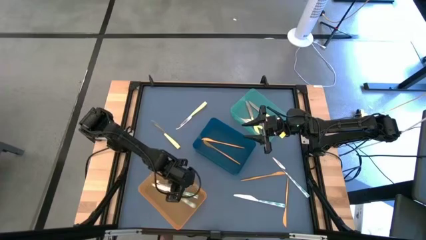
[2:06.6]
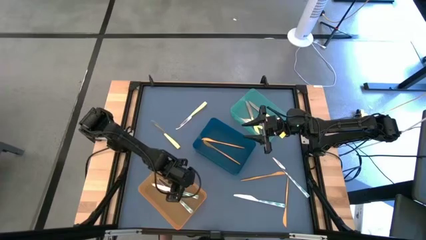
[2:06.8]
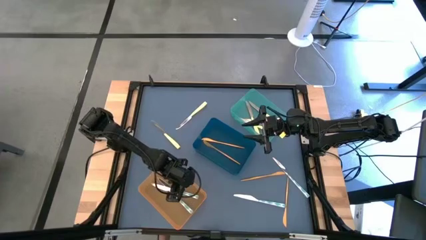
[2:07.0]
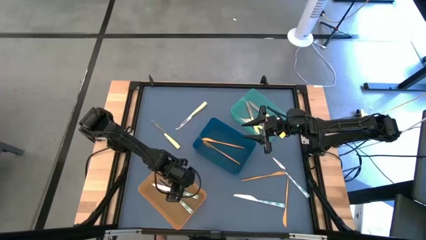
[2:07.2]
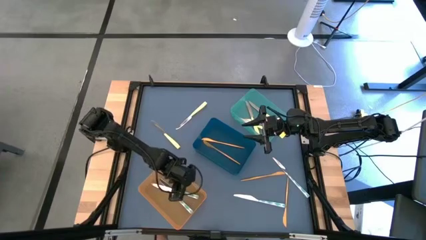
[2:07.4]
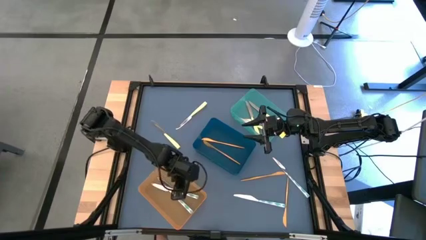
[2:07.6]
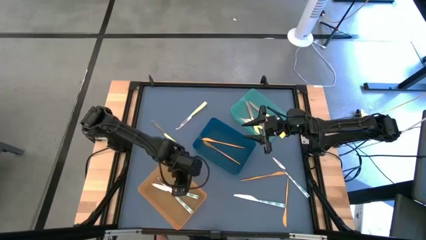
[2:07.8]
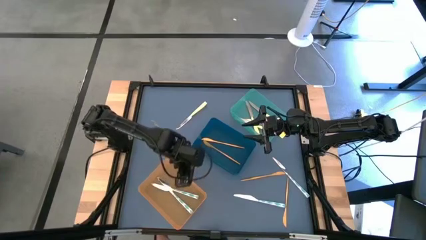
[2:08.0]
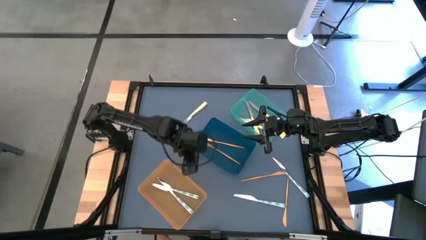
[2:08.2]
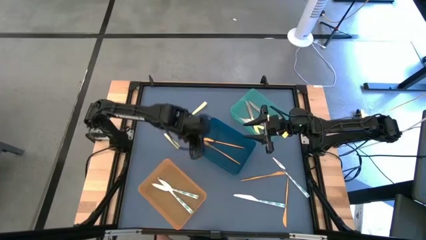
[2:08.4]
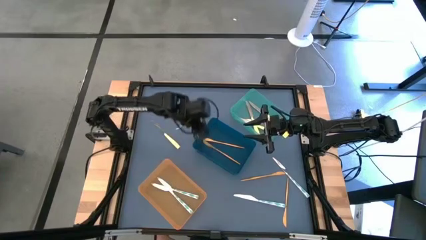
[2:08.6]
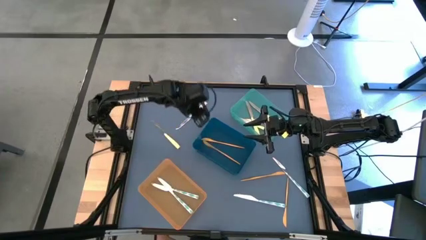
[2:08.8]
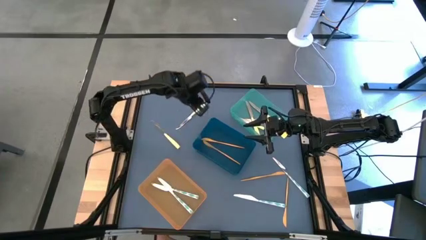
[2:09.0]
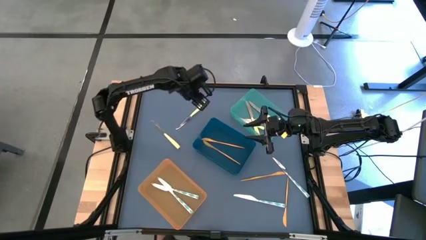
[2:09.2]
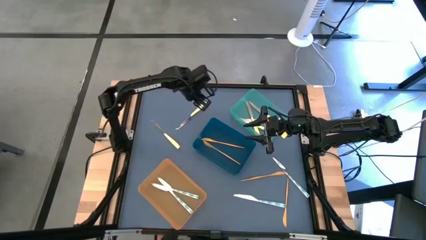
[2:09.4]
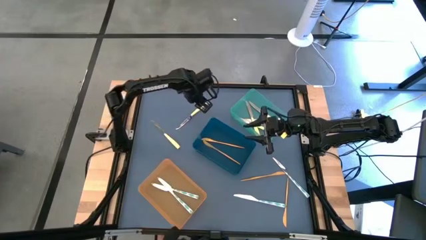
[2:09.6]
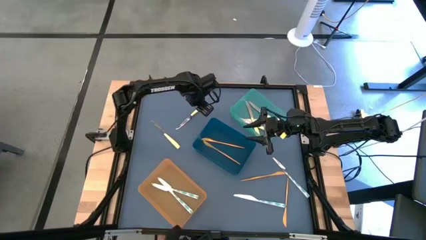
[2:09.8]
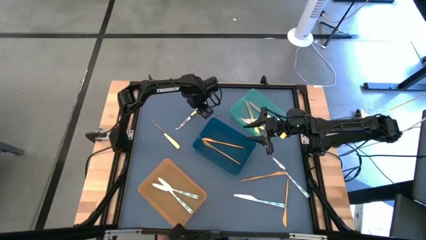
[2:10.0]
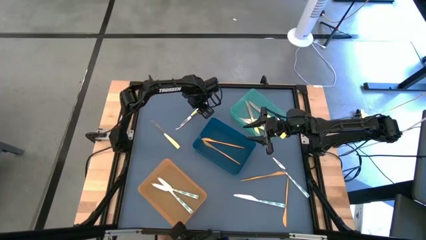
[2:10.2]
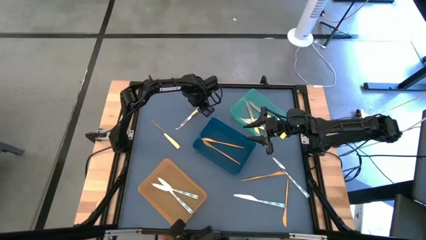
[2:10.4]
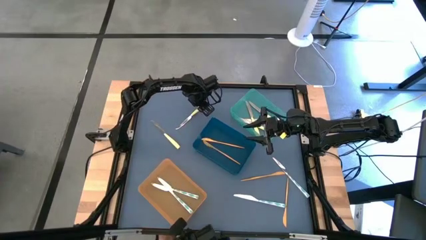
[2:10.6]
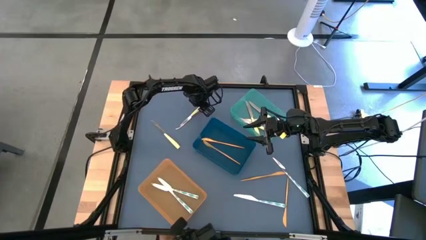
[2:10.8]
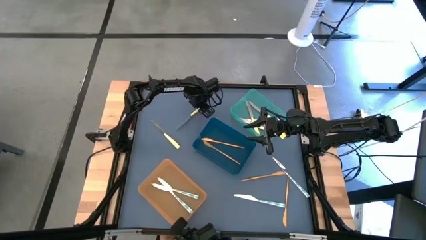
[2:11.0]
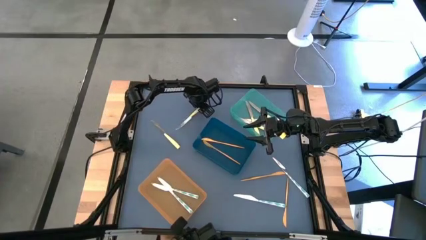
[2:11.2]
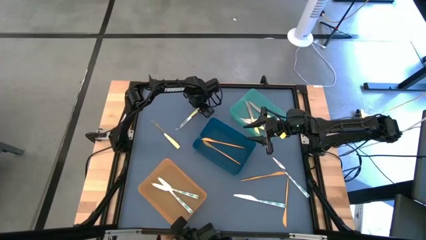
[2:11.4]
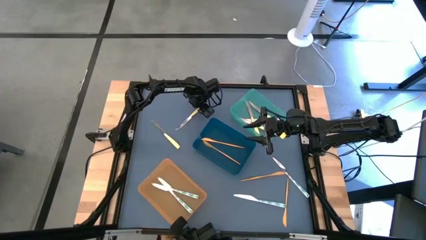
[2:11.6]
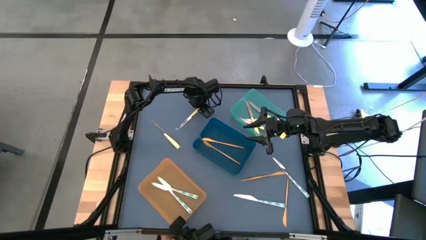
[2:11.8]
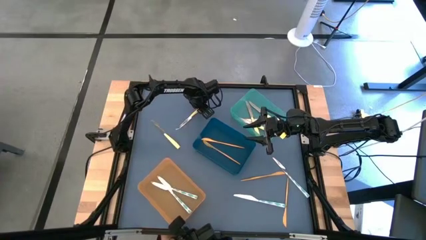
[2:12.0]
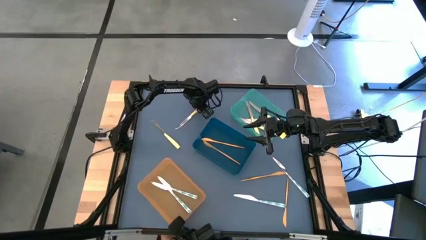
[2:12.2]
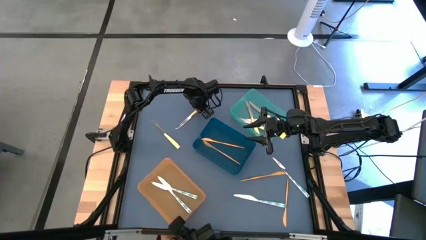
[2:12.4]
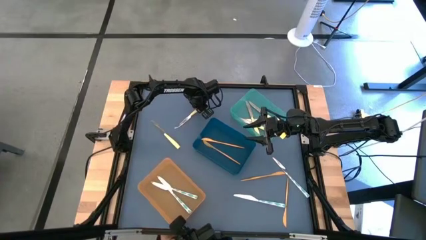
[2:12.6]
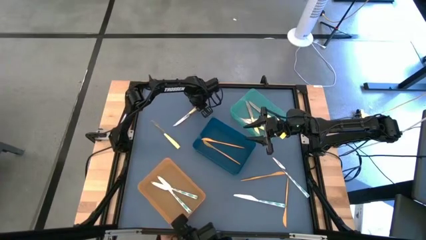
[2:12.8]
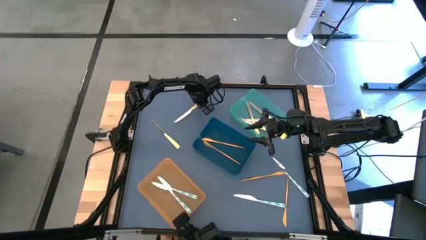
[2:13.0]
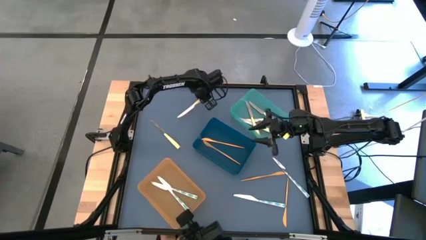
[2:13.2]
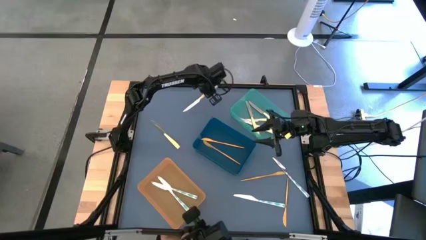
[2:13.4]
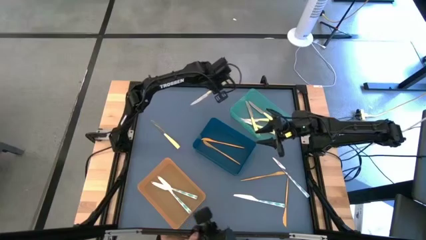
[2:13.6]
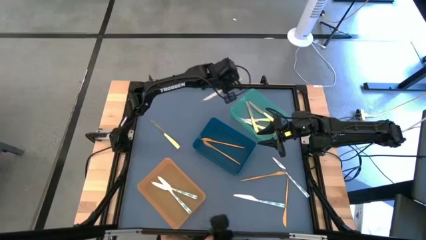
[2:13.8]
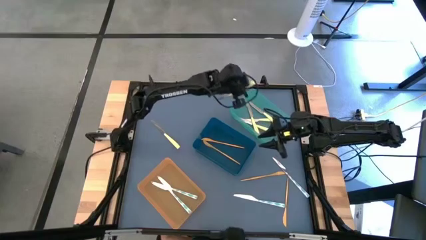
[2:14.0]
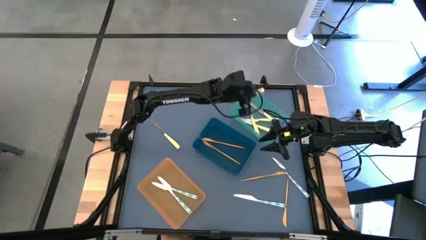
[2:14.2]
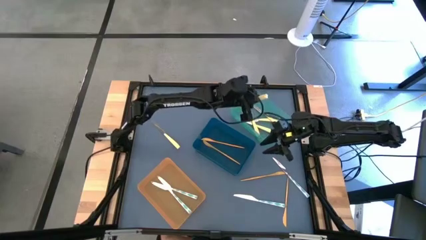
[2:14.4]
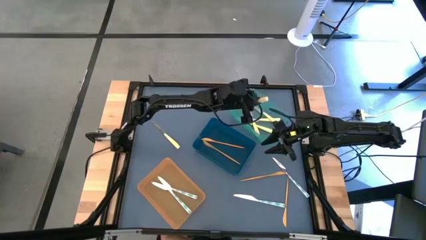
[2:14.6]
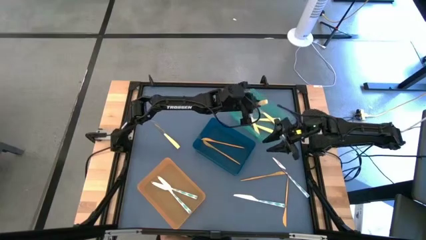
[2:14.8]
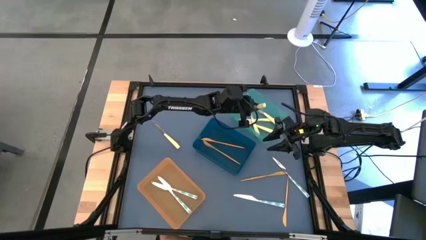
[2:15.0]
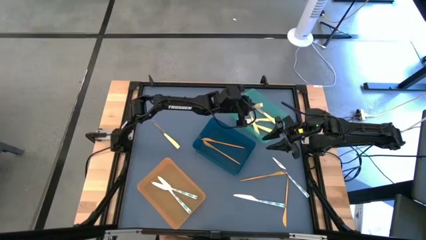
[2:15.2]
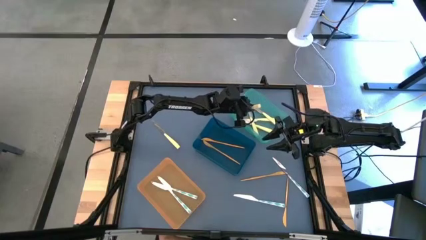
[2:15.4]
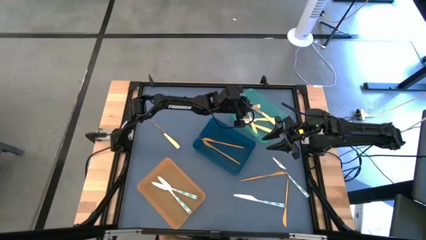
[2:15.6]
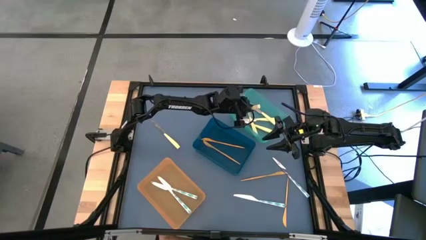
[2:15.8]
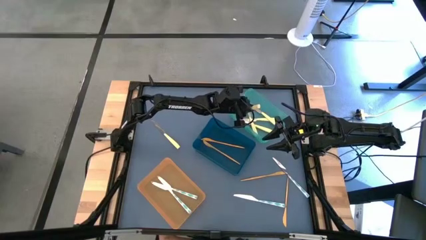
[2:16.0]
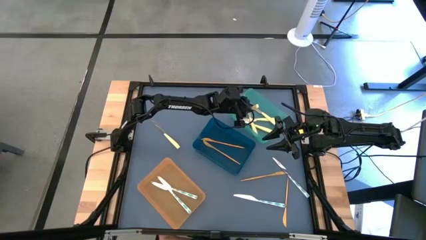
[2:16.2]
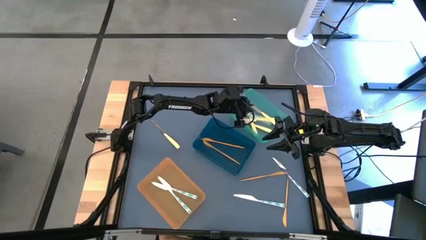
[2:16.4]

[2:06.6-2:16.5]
Task: Sort silverware by color (type)
Put the right yellow knife into the light blue bin

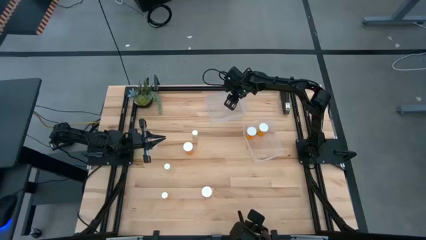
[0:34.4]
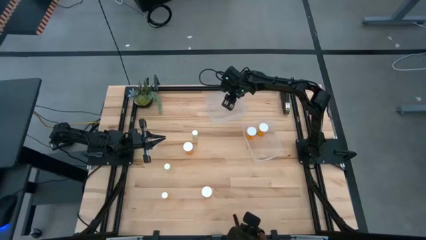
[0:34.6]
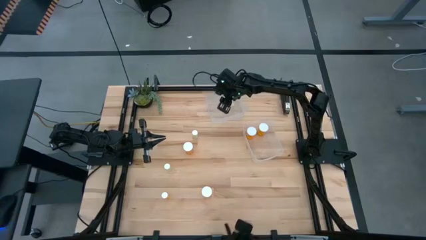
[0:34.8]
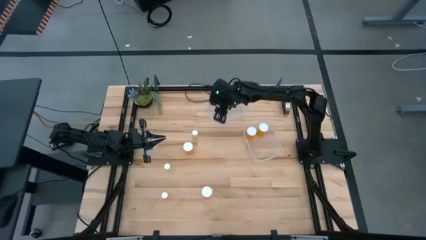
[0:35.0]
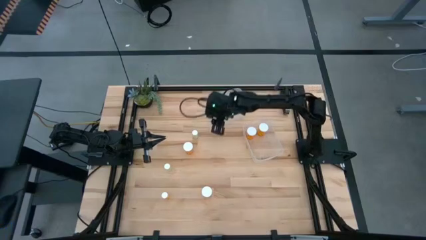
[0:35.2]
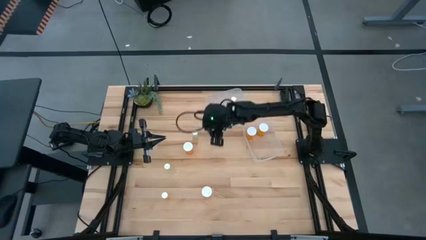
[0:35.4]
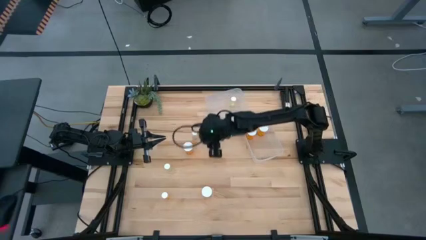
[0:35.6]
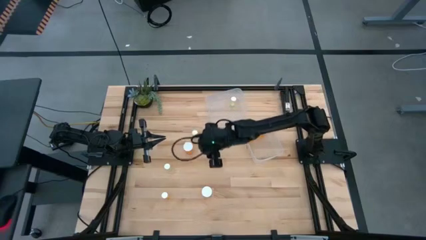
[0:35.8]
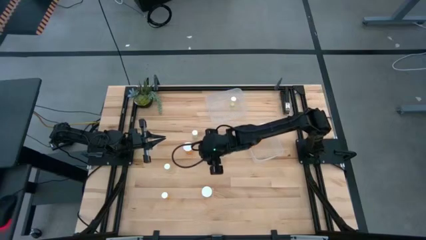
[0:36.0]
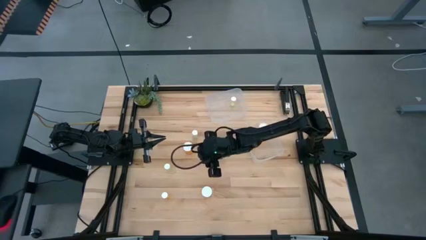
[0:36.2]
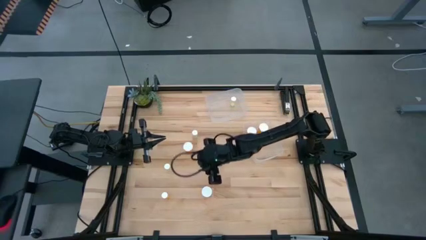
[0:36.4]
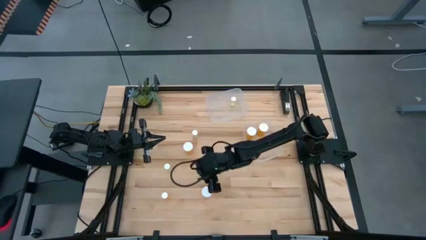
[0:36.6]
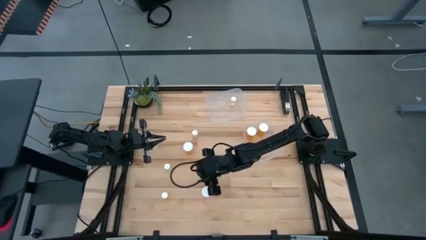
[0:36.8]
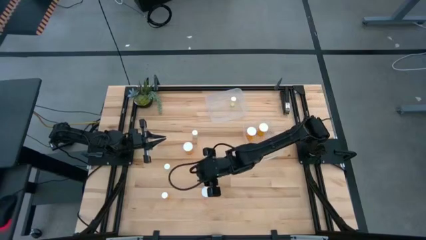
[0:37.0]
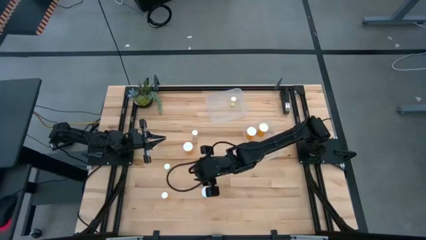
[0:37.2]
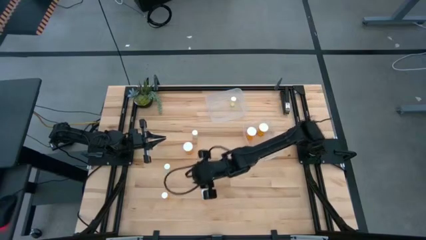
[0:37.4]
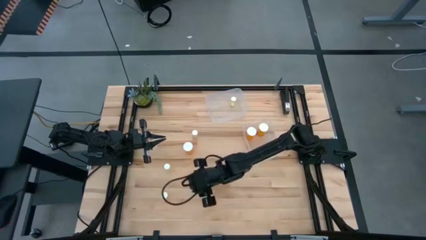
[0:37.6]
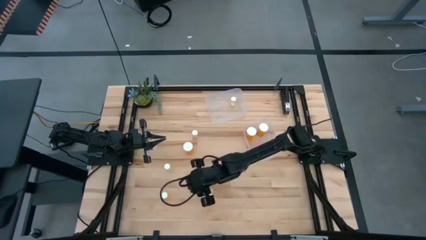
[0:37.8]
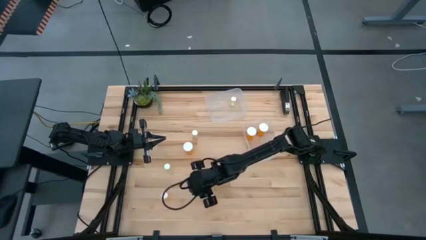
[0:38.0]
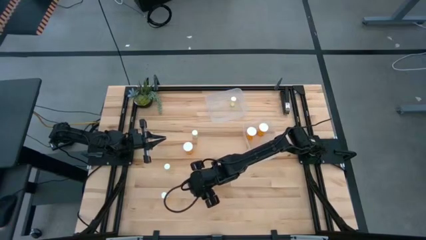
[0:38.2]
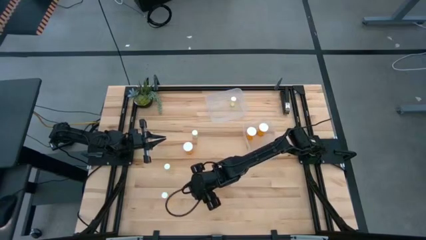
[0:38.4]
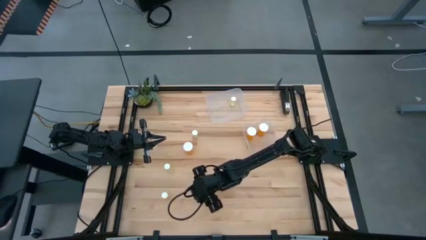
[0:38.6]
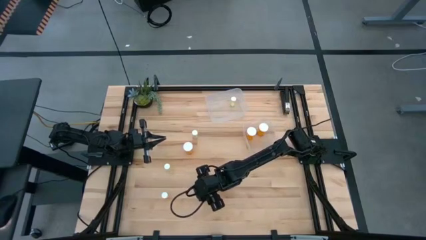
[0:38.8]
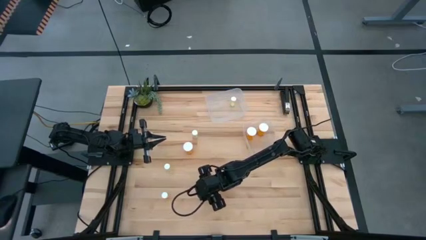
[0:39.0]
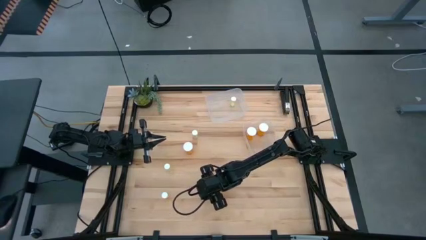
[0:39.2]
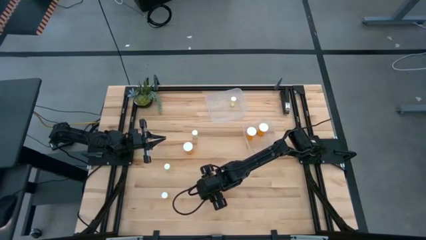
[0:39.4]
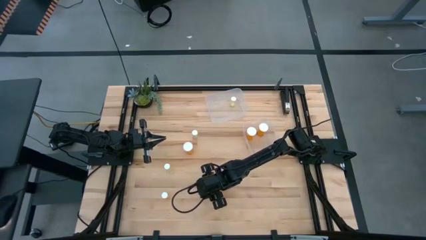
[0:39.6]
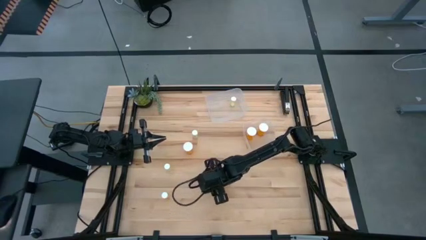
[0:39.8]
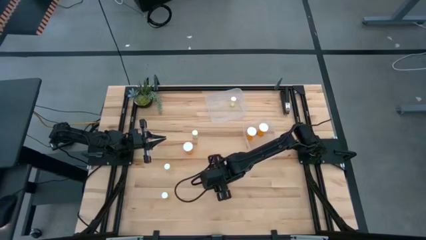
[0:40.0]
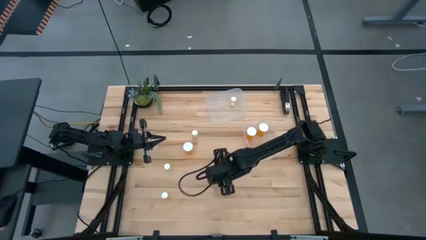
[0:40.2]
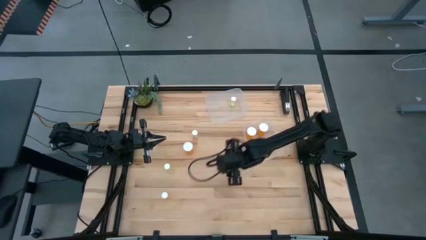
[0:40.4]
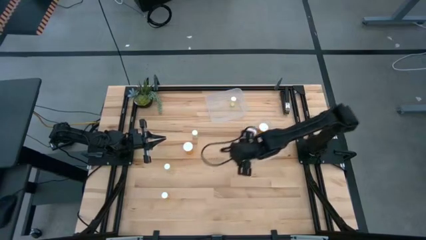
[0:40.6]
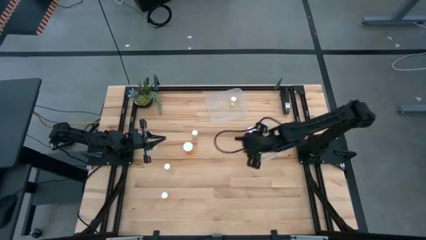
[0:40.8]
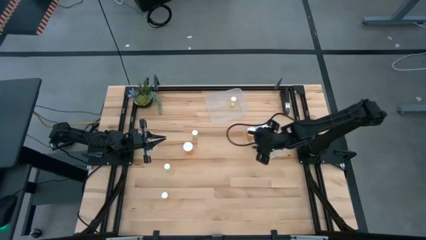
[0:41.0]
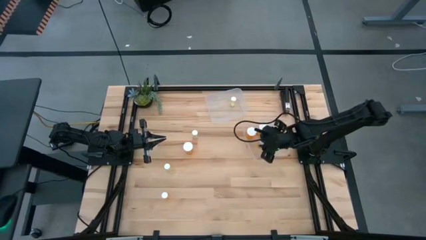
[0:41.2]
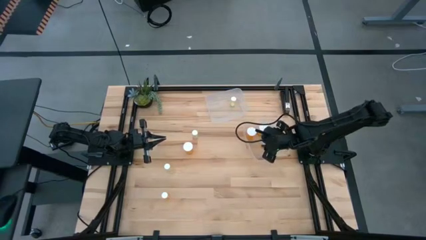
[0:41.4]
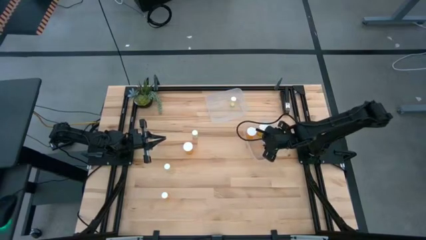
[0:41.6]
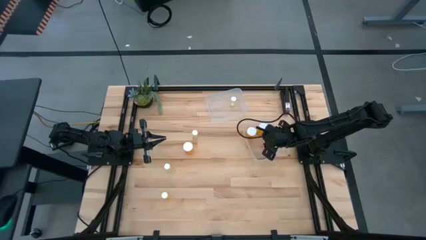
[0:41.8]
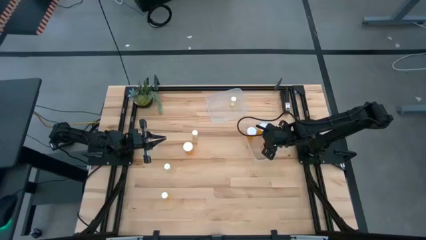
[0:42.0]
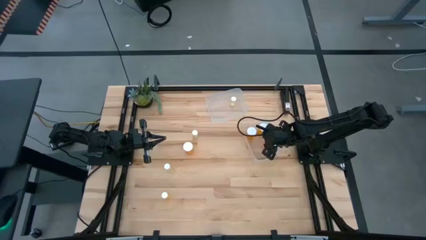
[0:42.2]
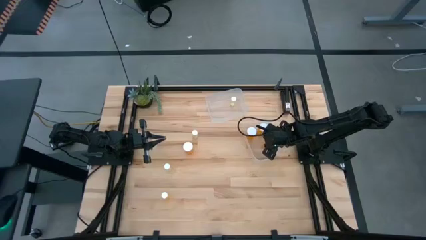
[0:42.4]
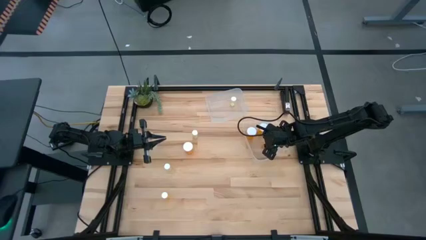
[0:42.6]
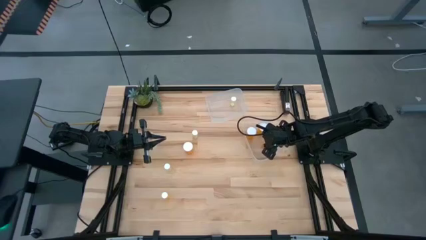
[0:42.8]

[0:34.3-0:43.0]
Task: Pick and place medicine bottles into bin by pill shape (circle, oval)
Put the bottom big orange pill bottle into the bottom transparent bin
